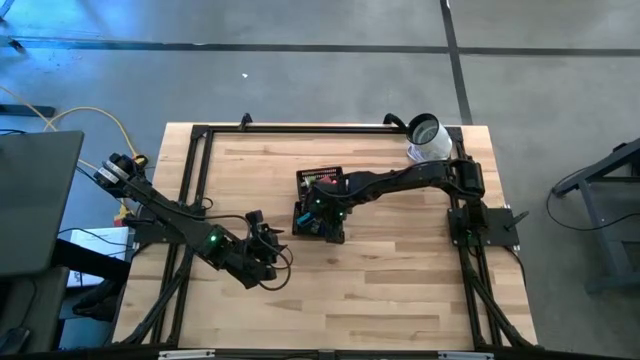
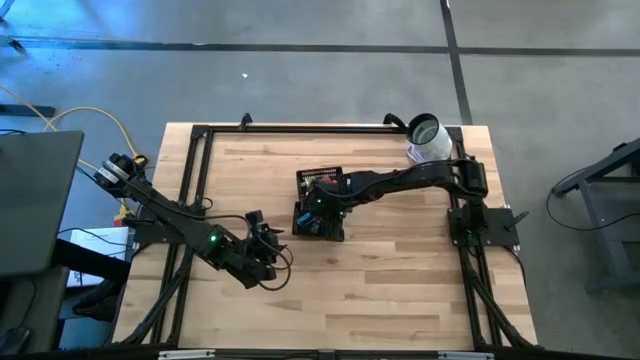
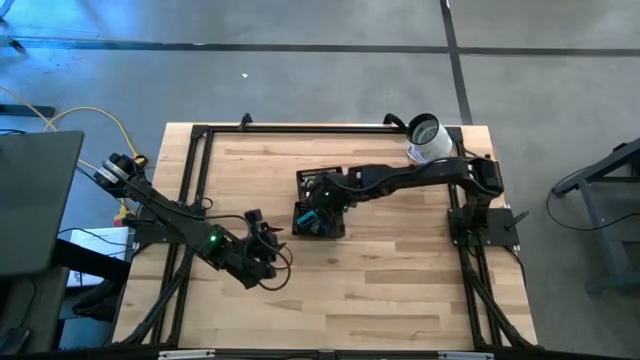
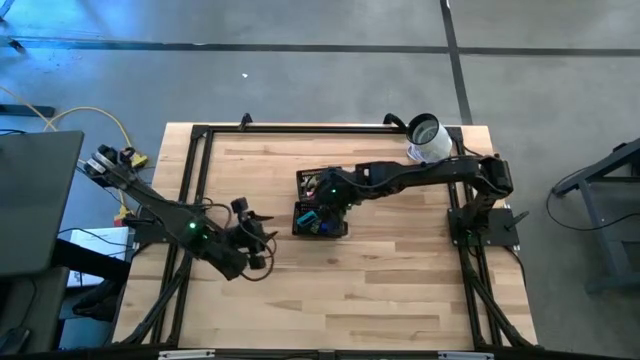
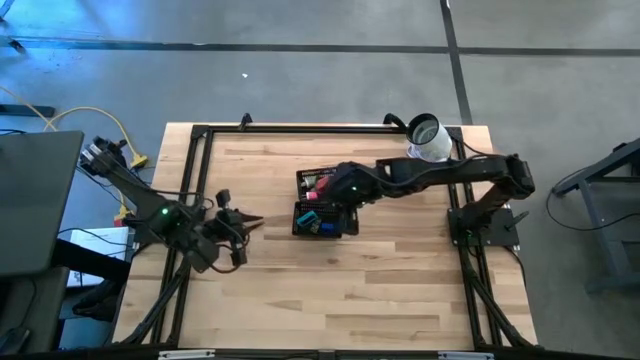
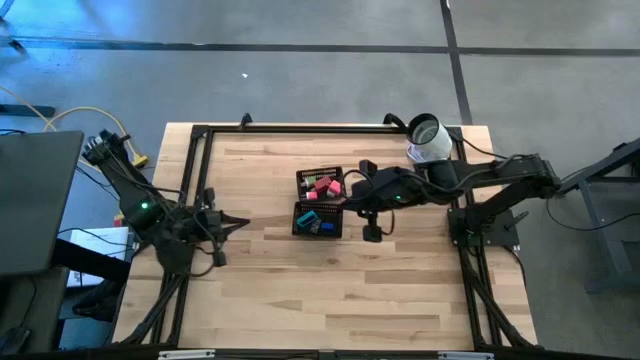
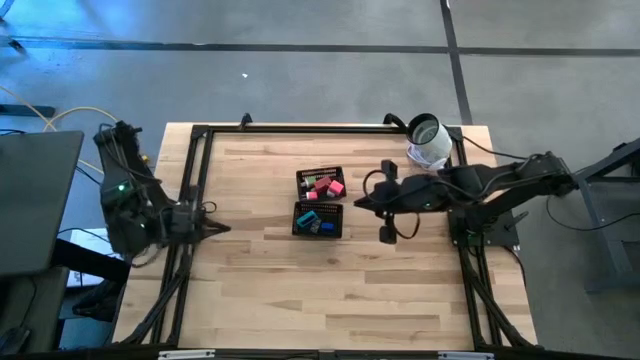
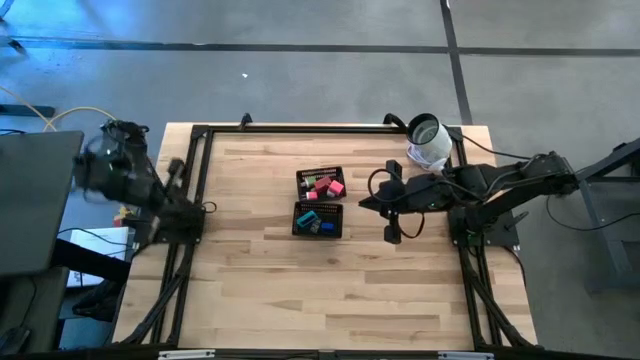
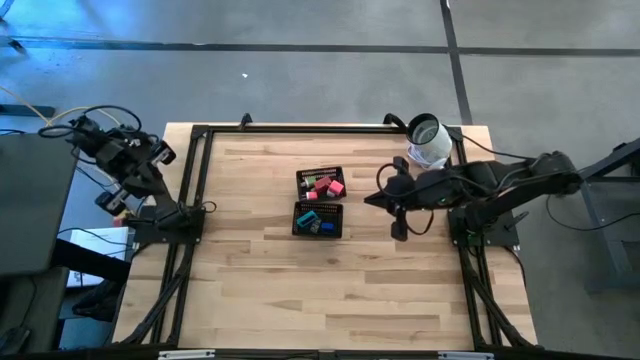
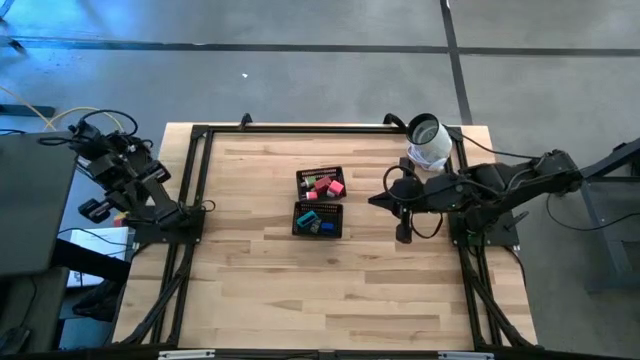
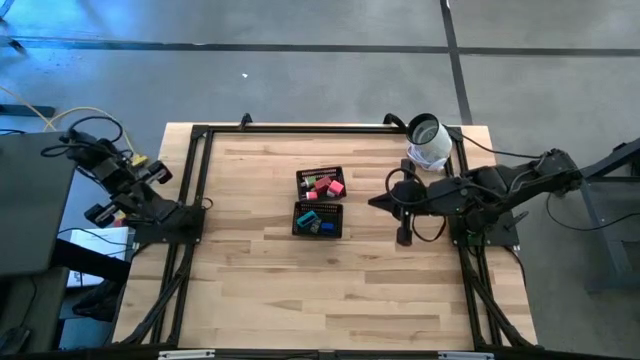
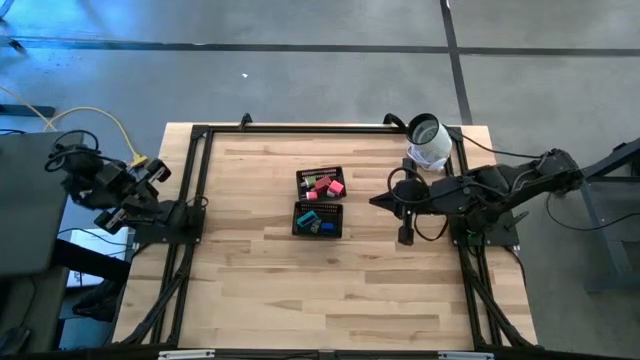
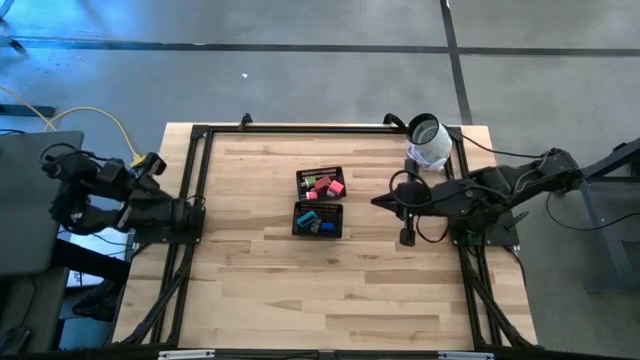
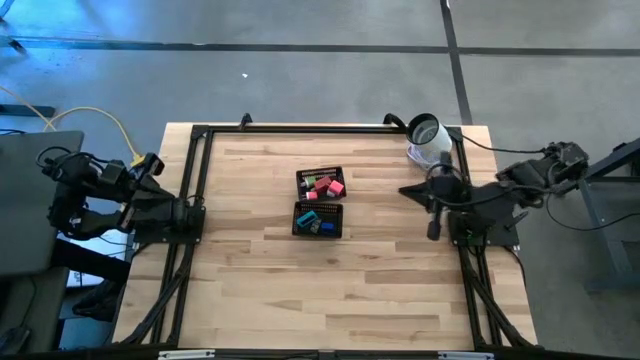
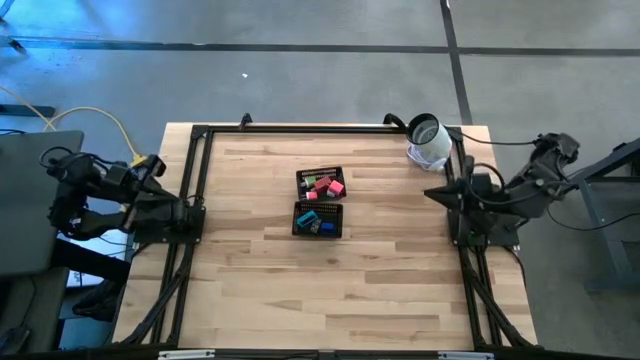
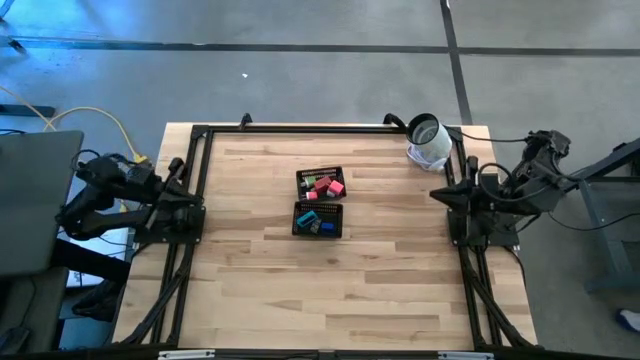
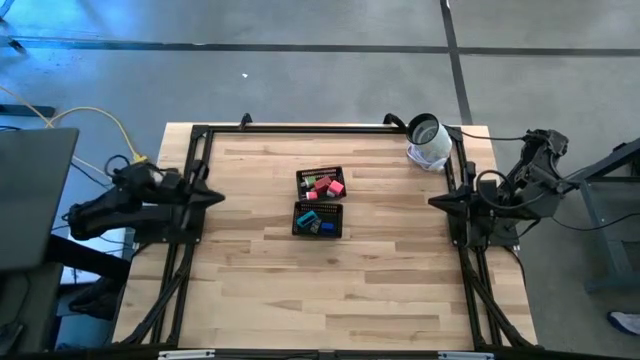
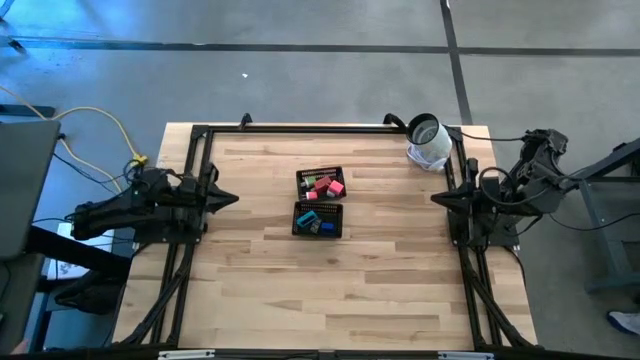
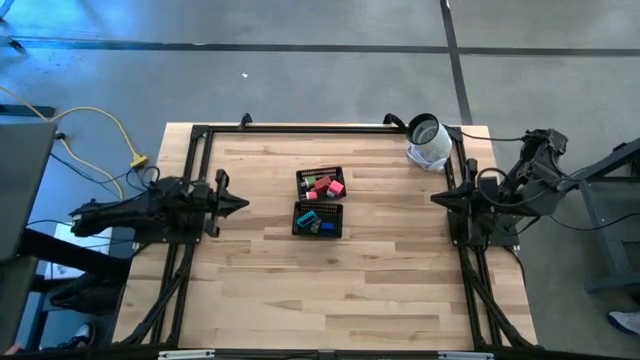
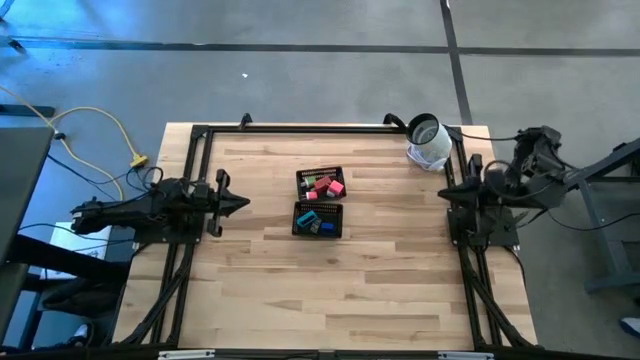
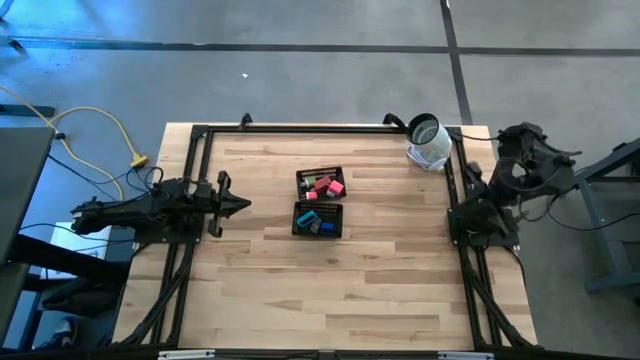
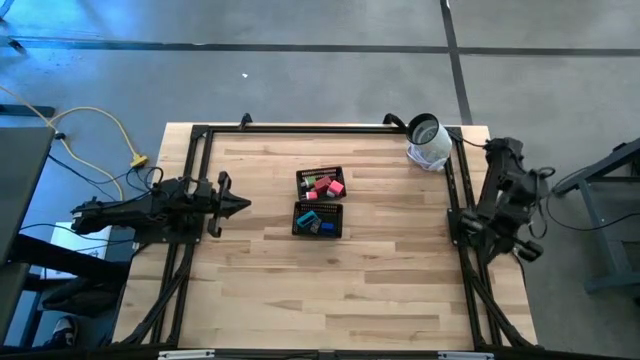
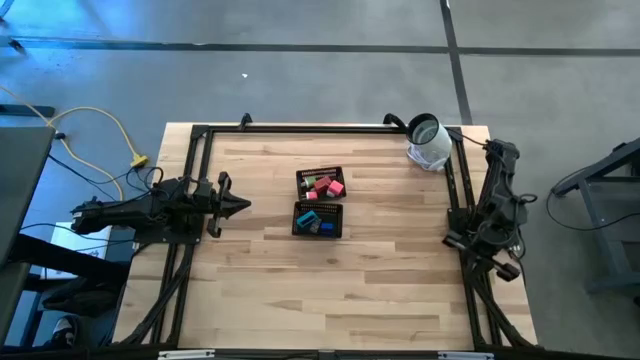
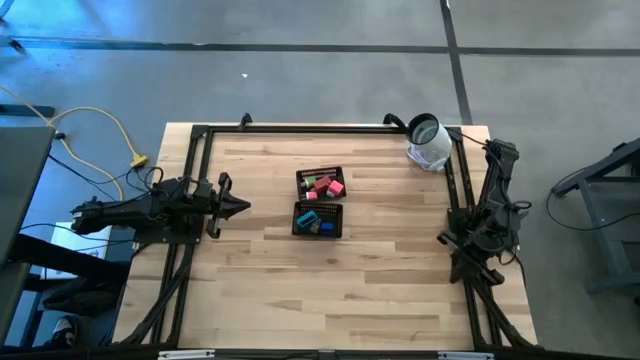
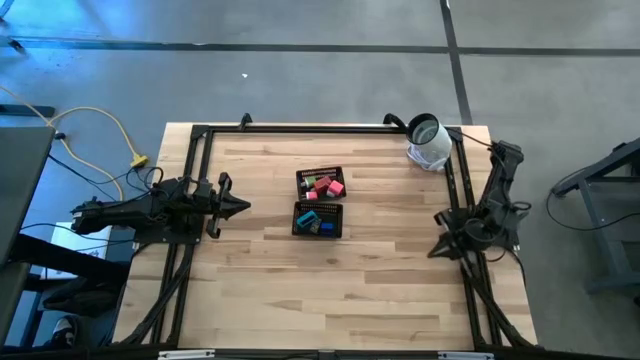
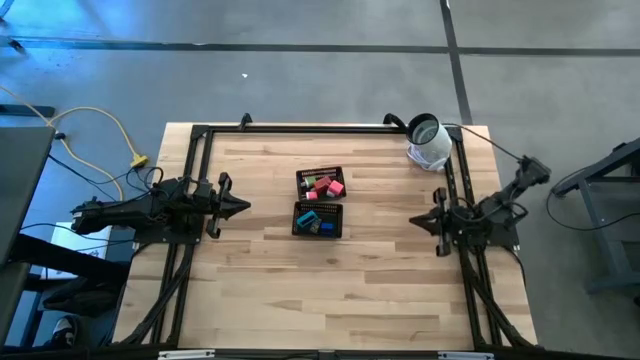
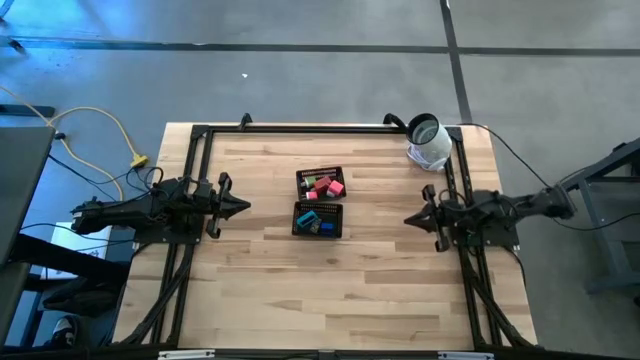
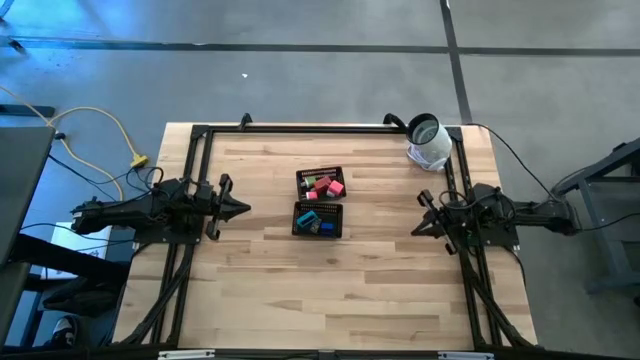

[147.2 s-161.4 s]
Task: Pick & Place Office items
Return to Home Position

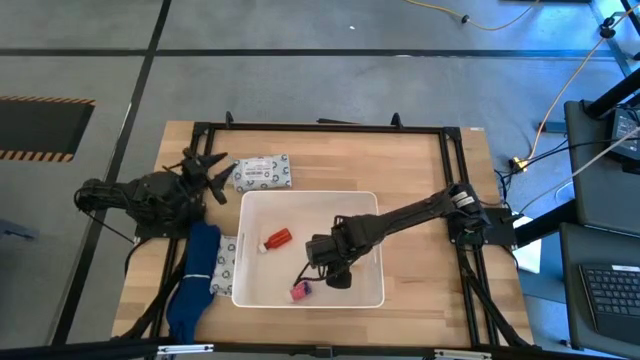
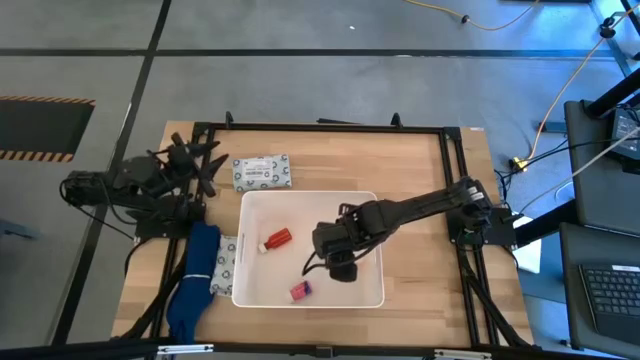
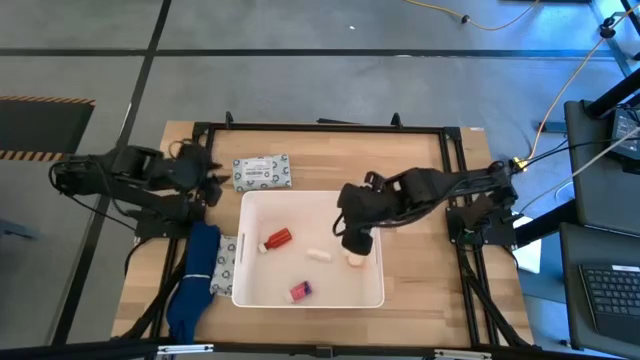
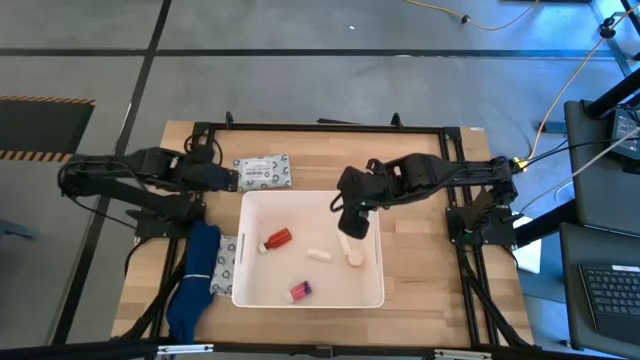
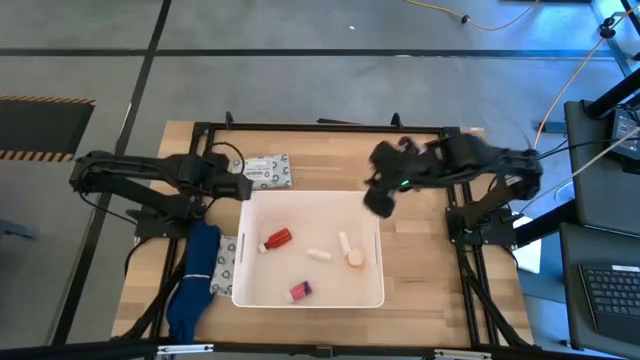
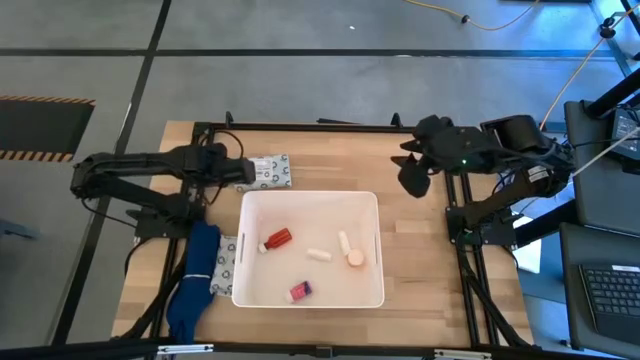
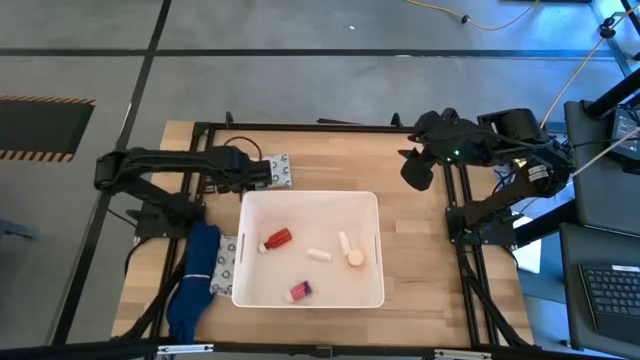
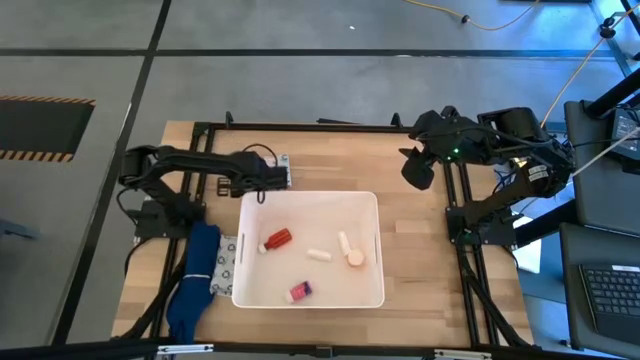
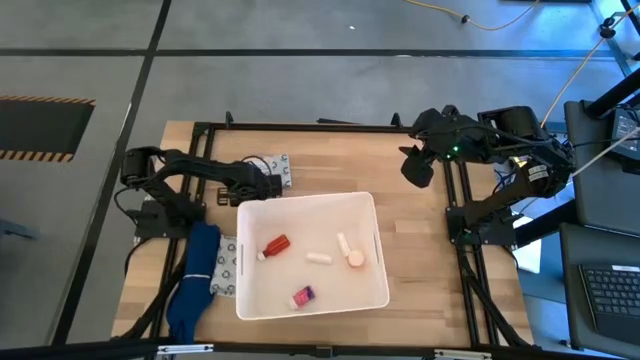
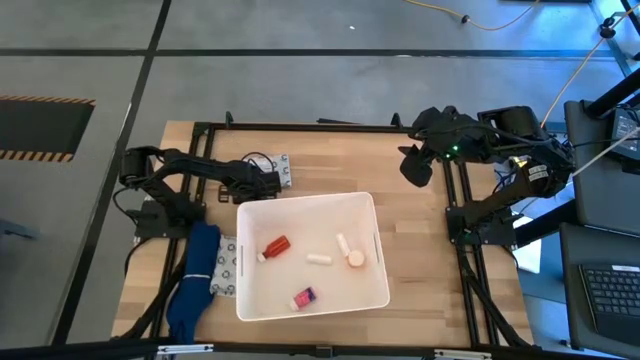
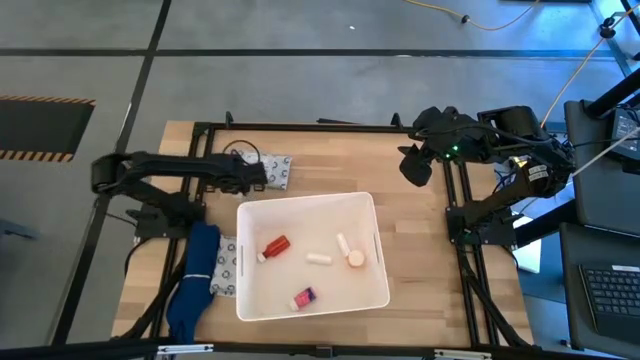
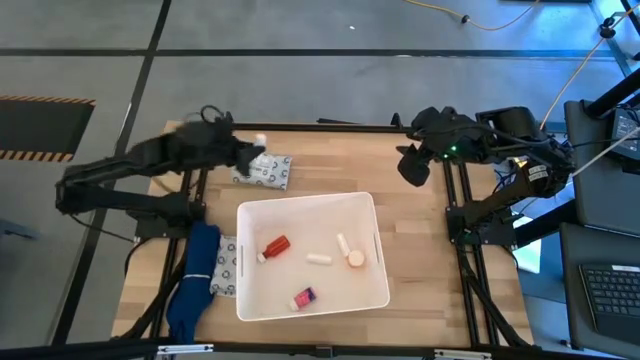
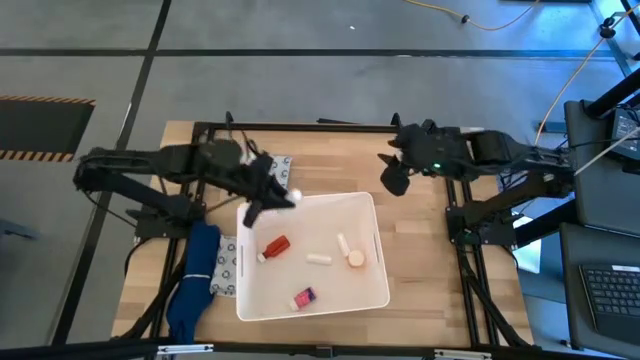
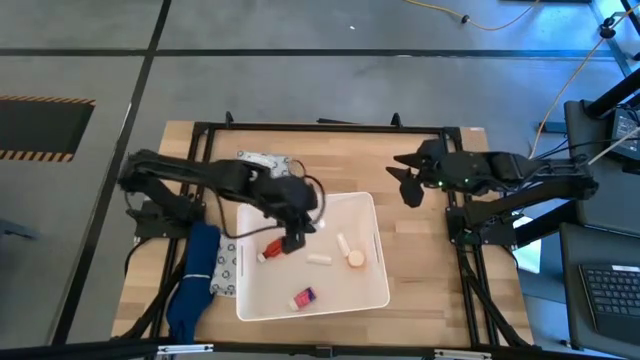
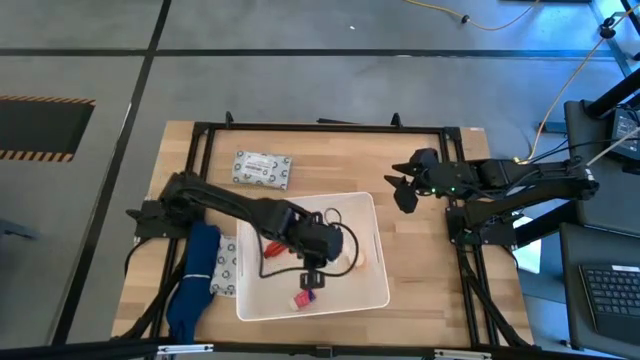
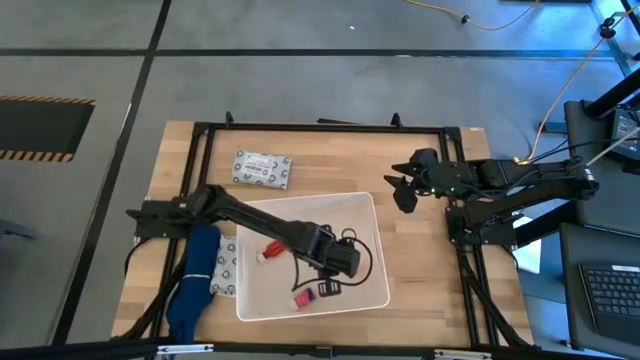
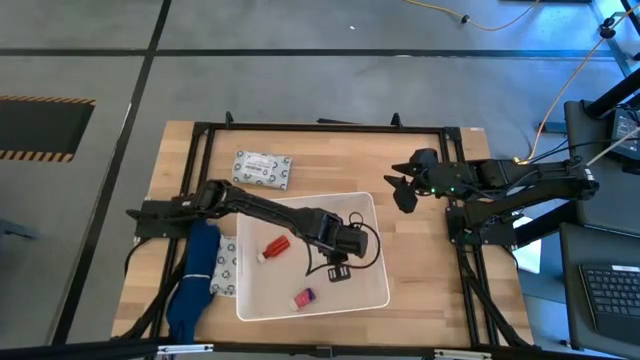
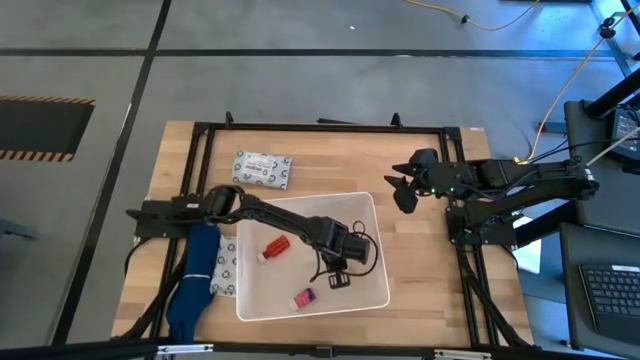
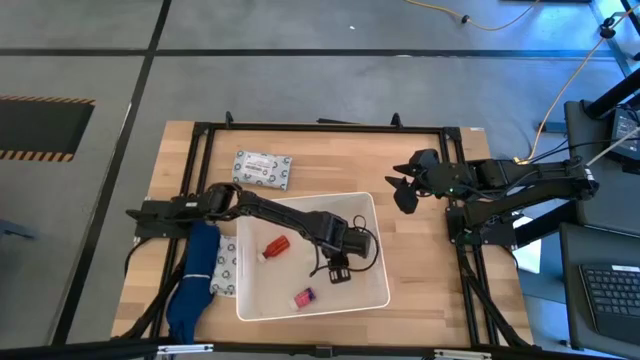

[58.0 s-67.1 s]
Task: Pick & place medical supplies in basket/bin
Put the white rolled gauze into the white bin
